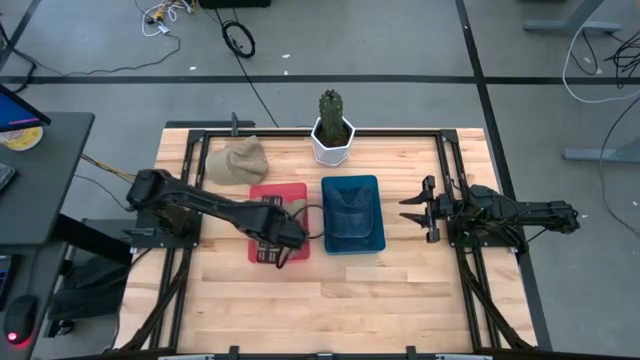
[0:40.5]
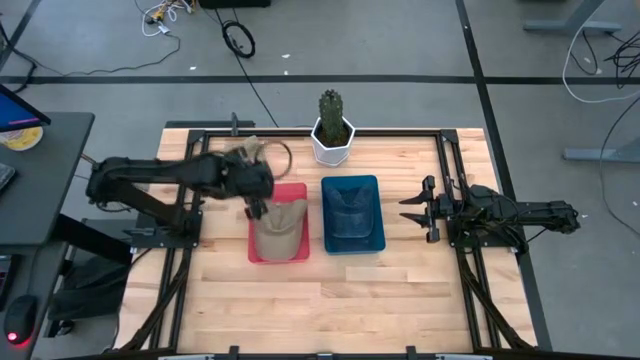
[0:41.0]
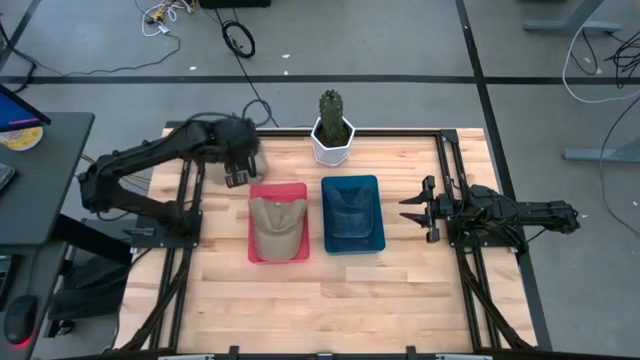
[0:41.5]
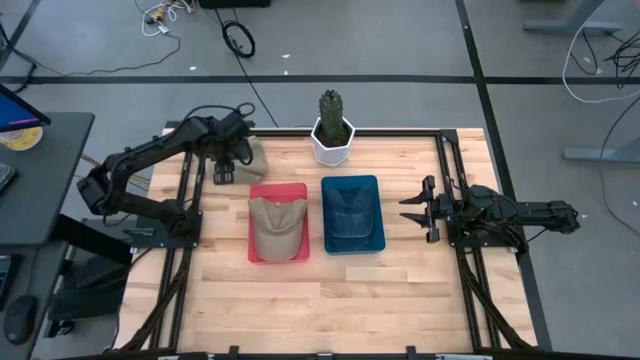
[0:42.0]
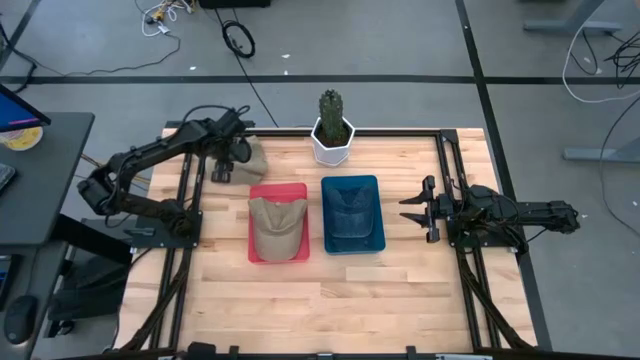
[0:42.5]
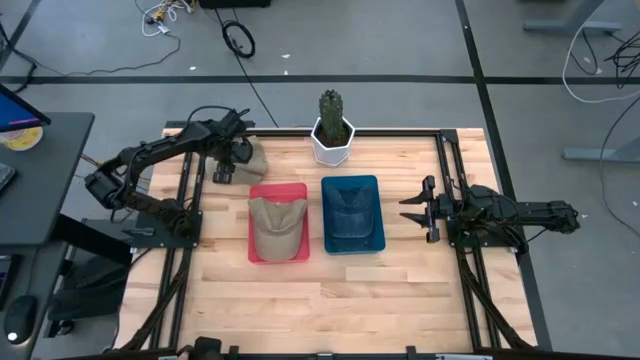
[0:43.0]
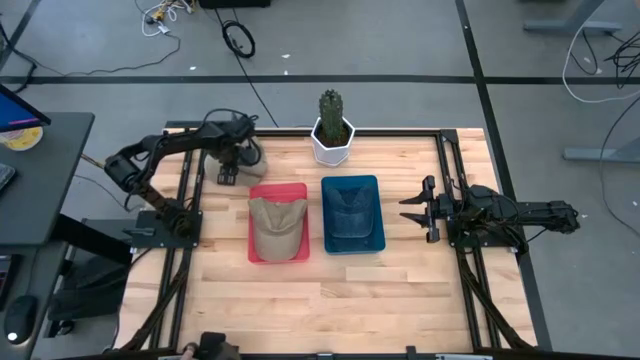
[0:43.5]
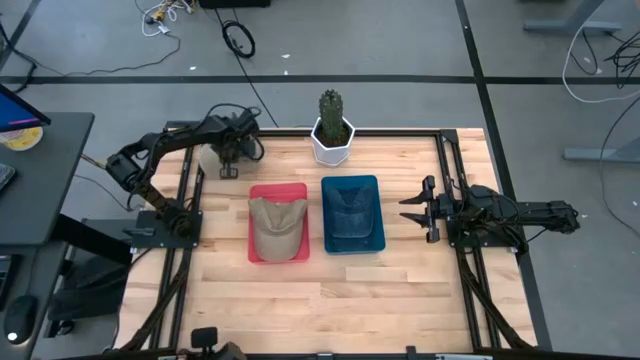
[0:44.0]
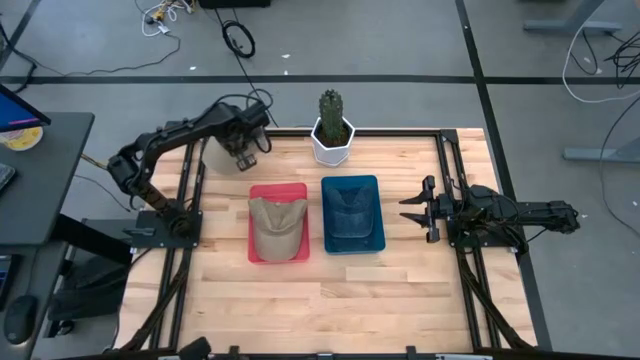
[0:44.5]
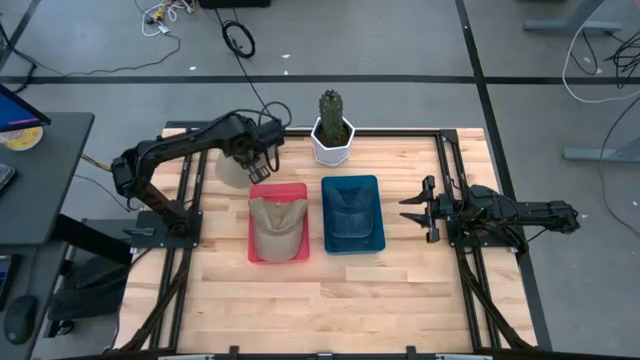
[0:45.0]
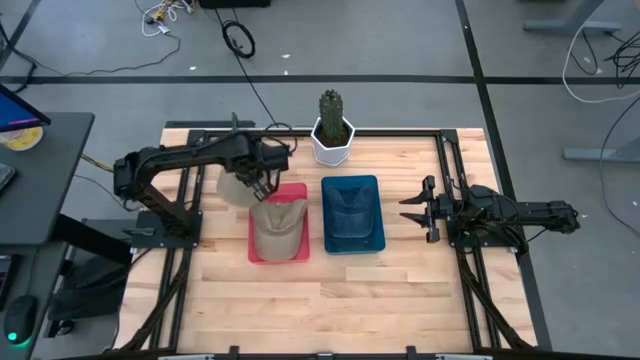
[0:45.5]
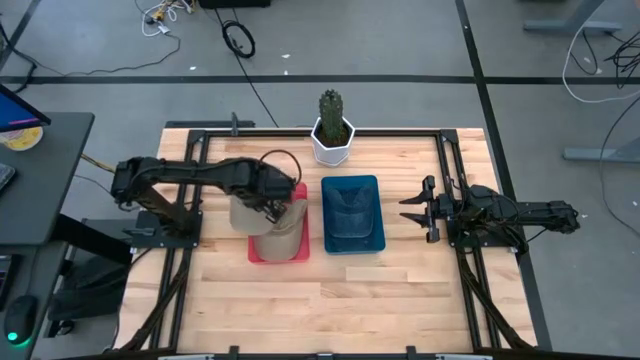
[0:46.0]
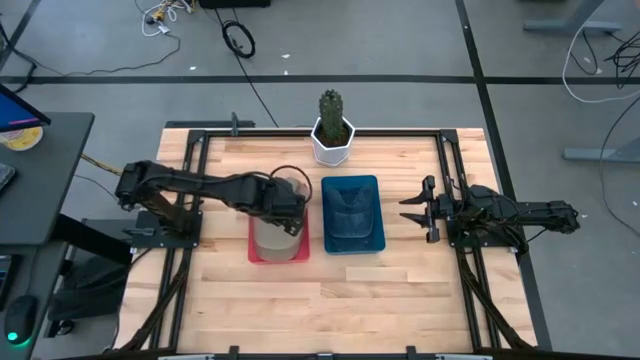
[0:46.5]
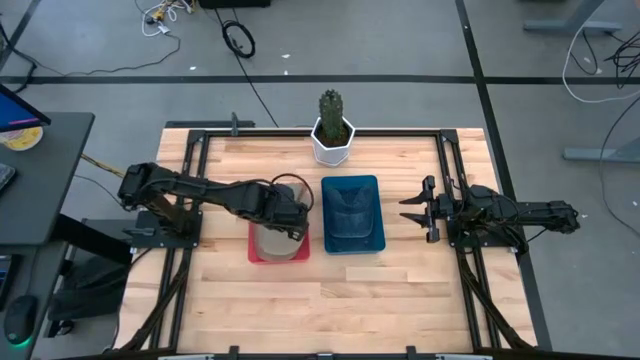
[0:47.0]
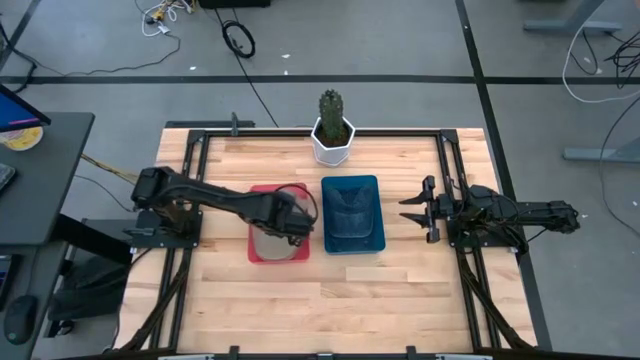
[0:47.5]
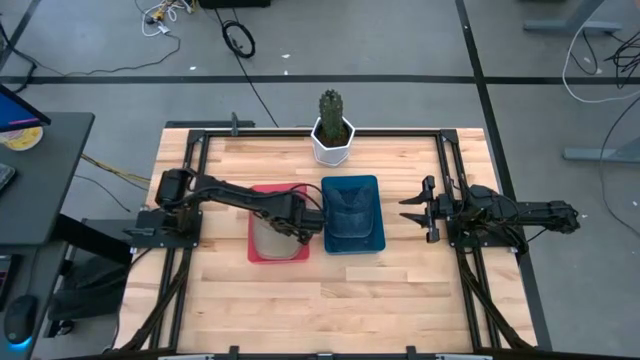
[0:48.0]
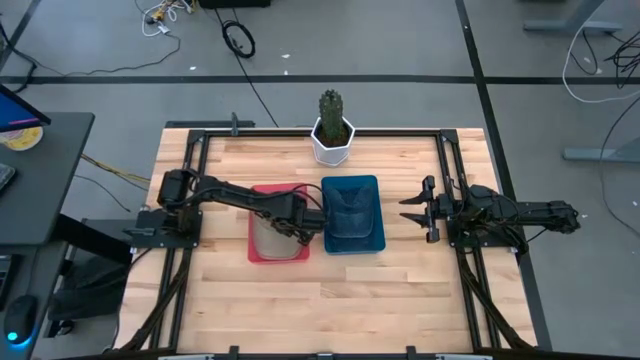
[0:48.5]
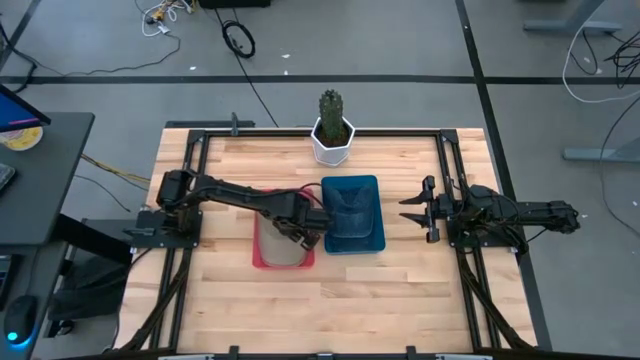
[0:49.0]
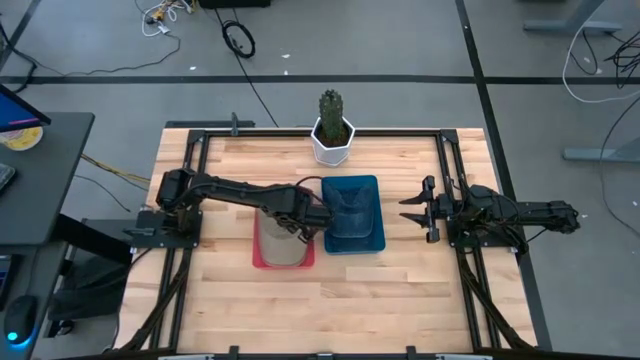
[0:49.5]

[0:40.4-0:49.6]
Task: Pick & Place hat
Put the light brown cup into the red bin

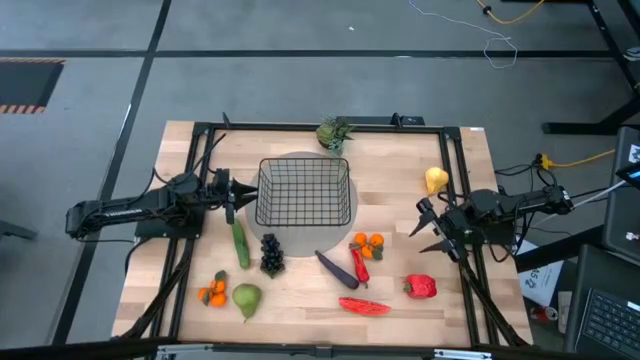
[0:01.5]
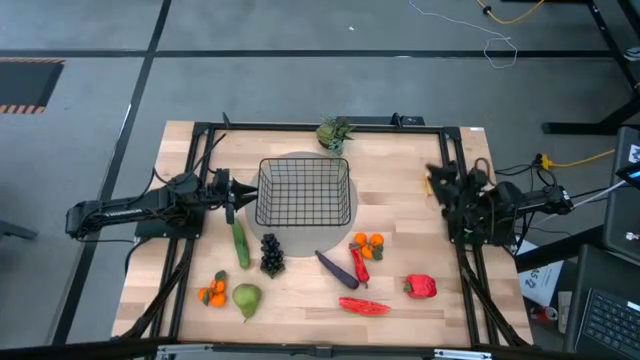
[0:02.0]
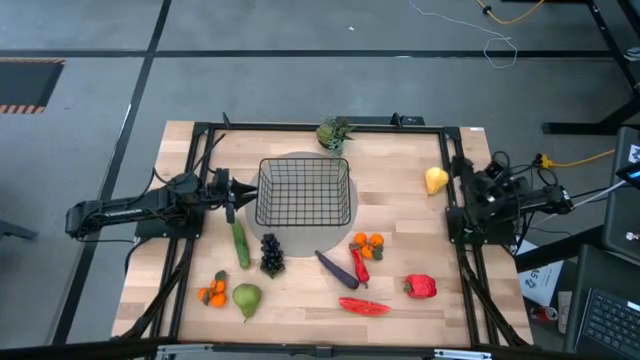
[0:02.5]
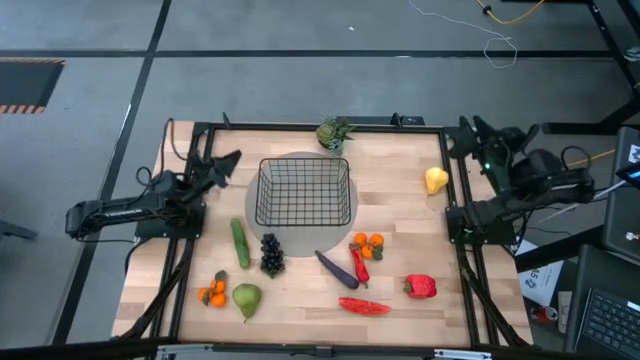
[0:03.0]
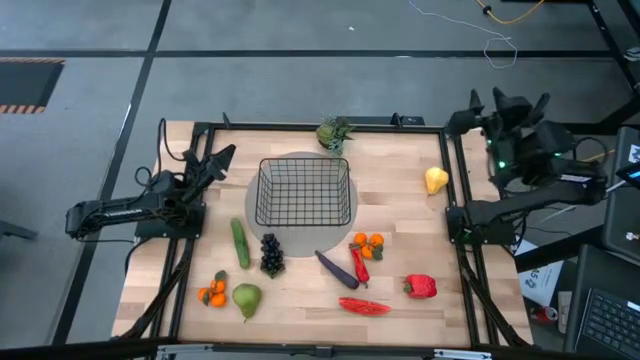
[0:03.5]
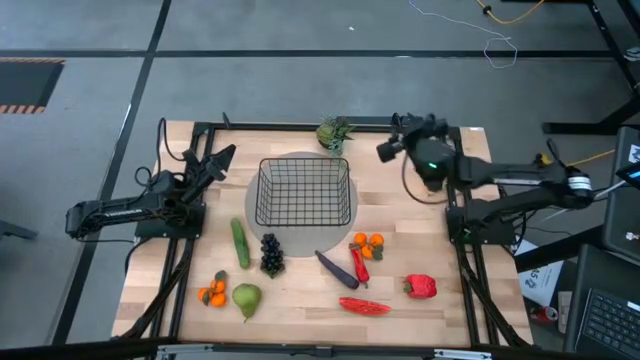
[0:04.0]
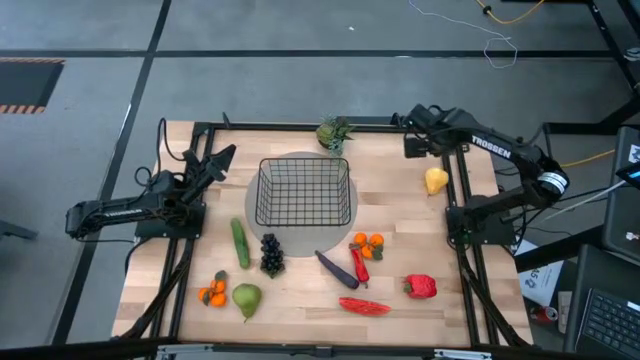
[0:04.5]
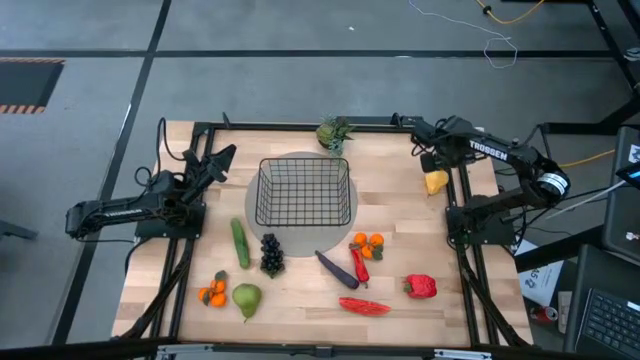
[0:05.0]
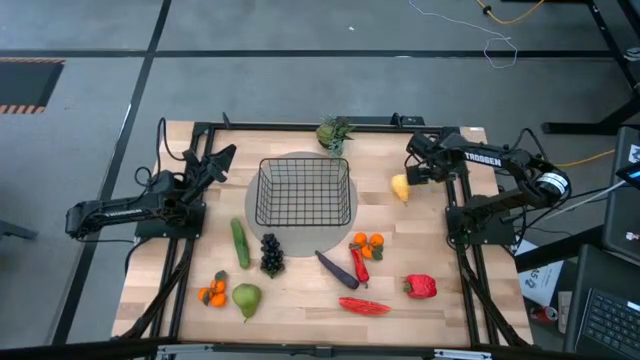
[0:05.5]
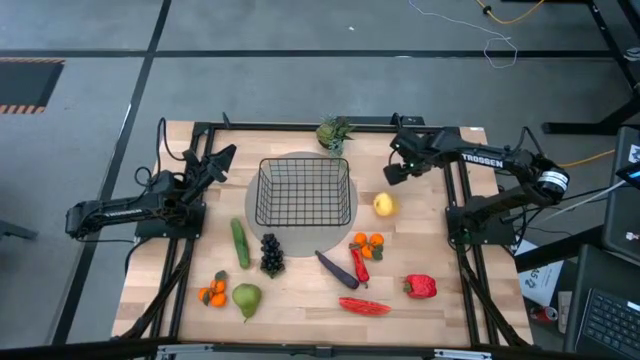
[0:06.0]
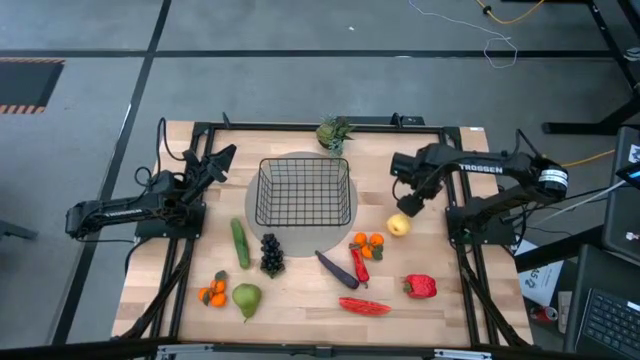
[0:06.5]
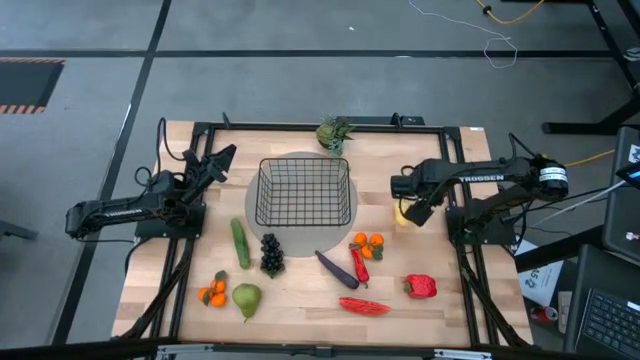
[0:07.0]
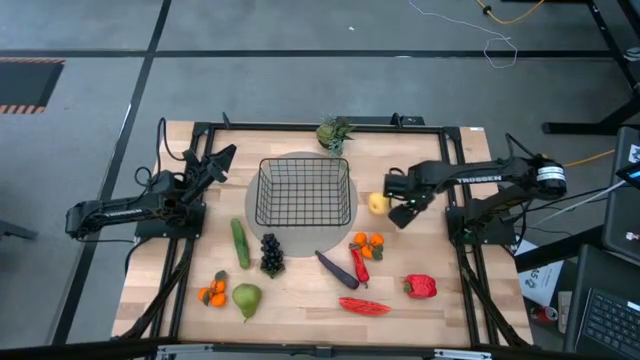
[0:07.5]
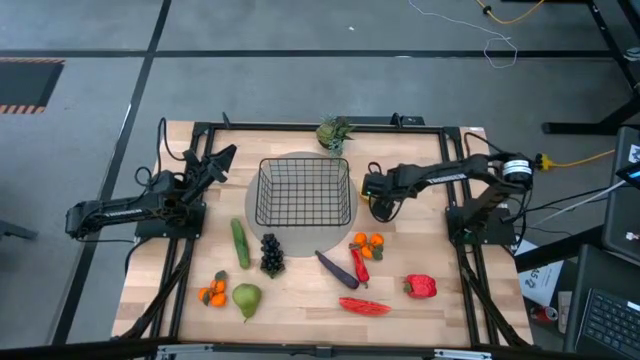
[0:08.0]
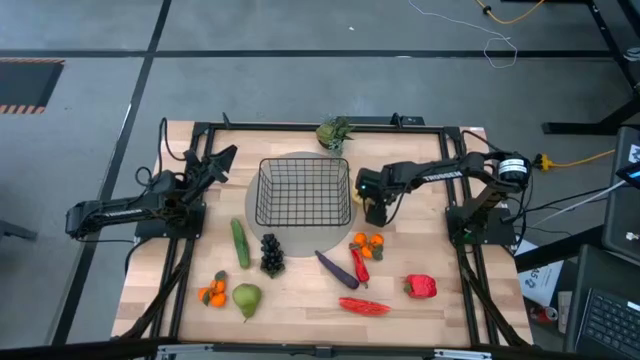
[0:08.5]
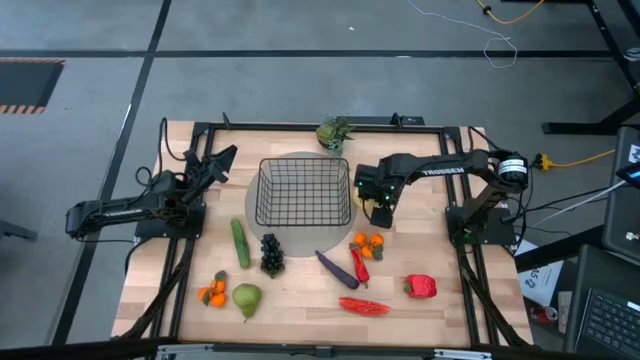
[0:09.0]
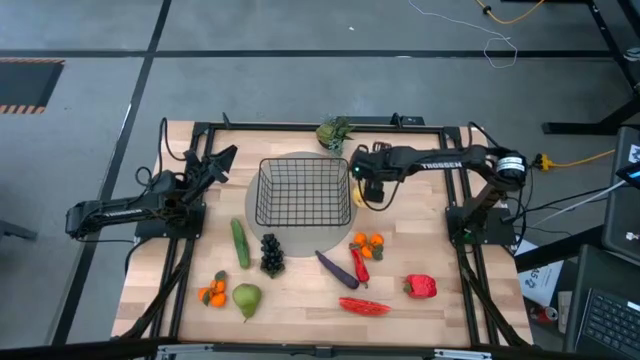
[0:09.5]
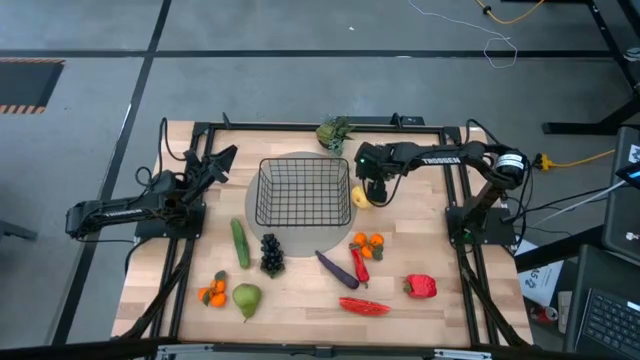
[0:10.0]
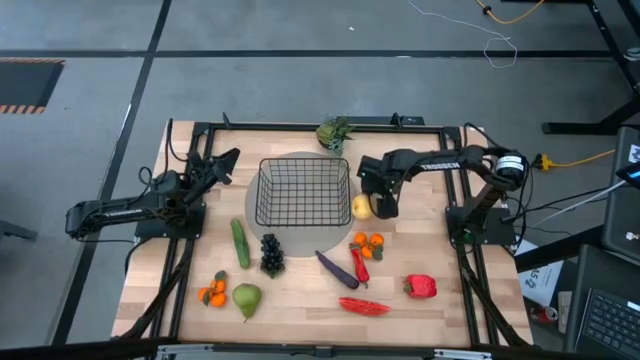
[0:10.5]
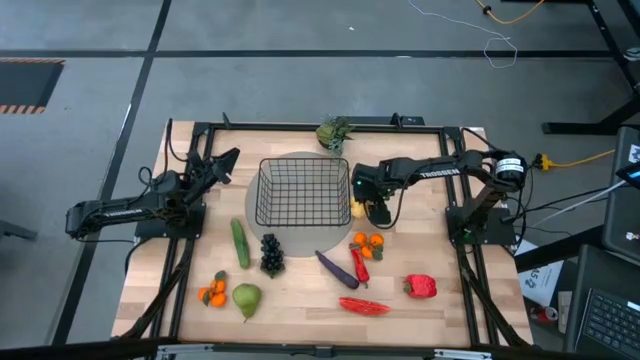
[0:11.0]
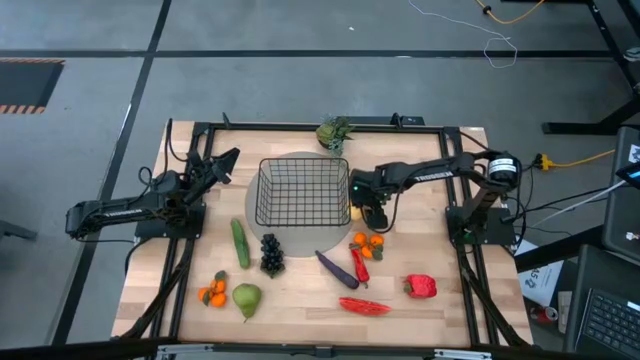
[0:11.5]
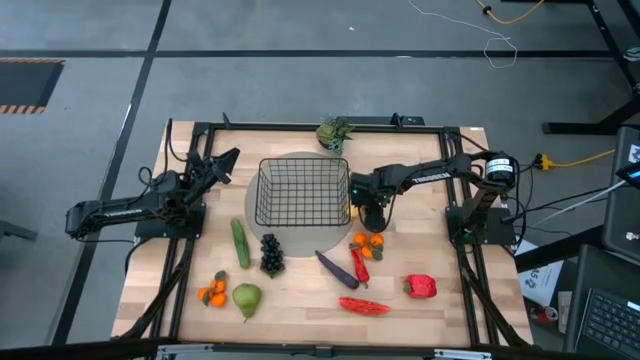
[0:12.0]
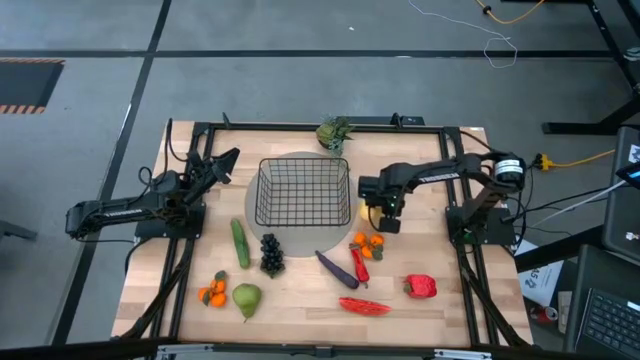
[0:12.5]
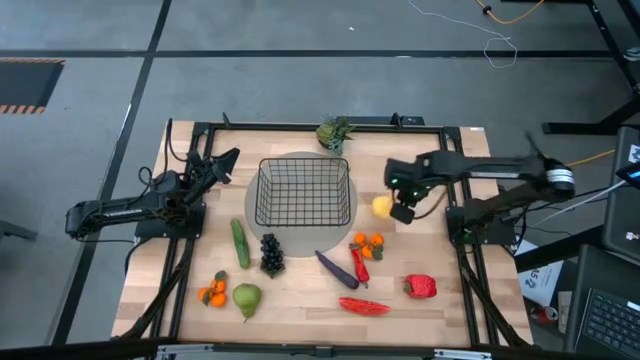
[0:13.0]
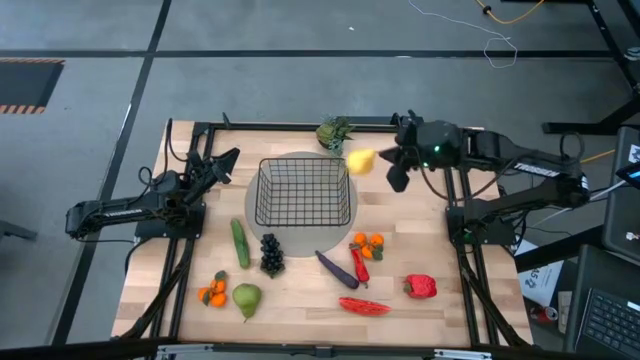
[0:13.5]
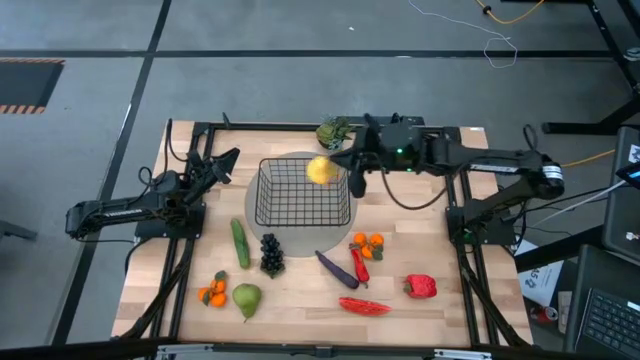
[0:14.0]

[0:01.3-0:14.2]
Task: Build produce basket
Put the yellow pear into the black wire basket
